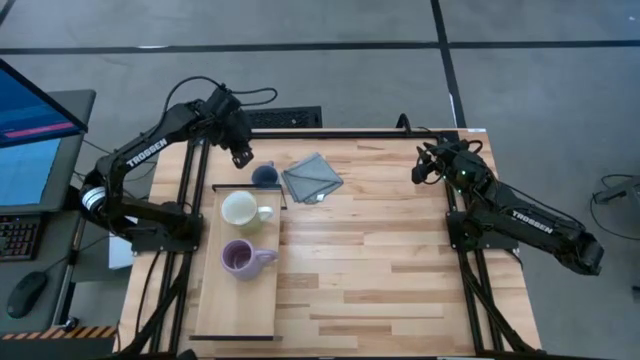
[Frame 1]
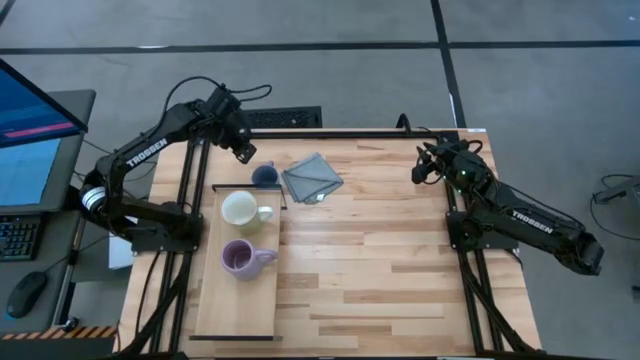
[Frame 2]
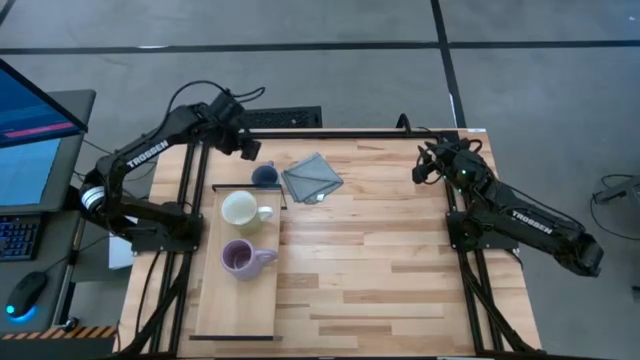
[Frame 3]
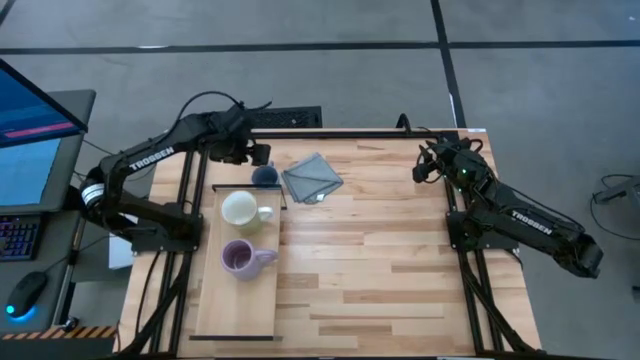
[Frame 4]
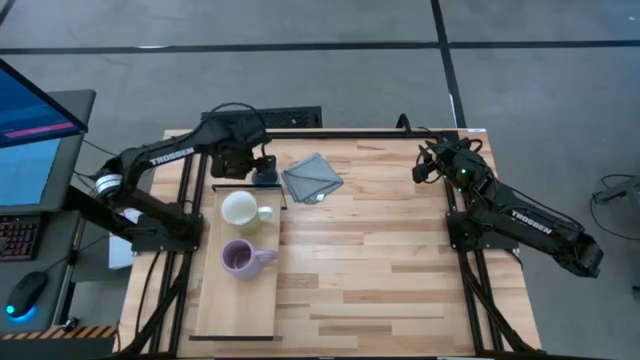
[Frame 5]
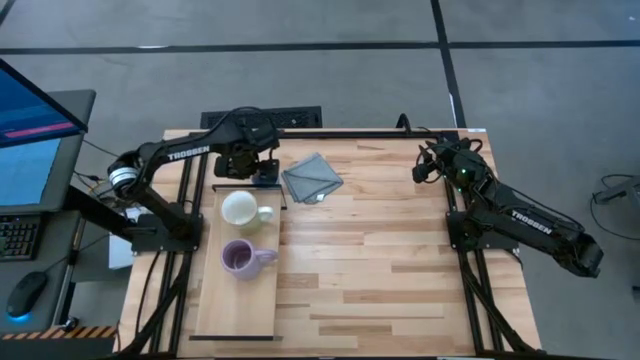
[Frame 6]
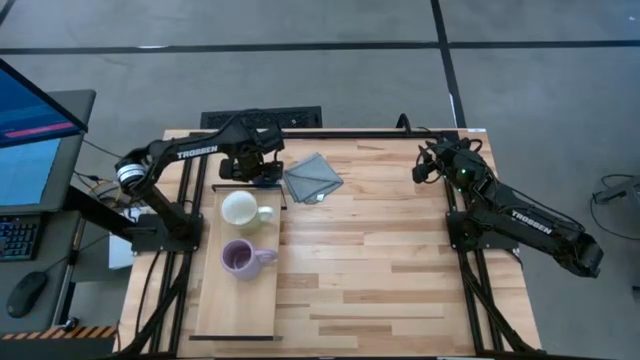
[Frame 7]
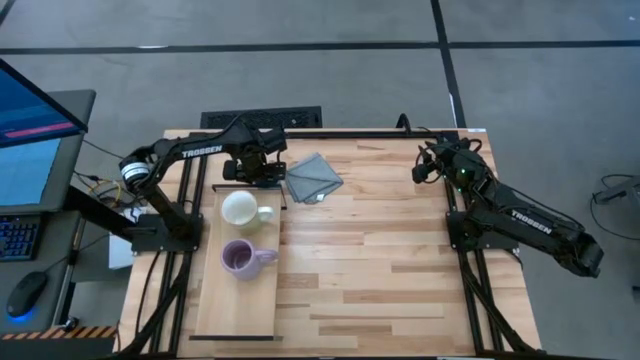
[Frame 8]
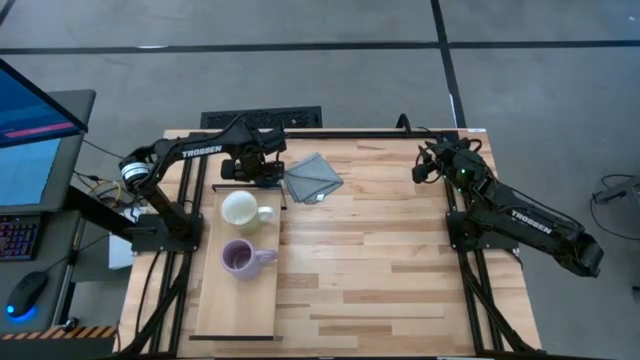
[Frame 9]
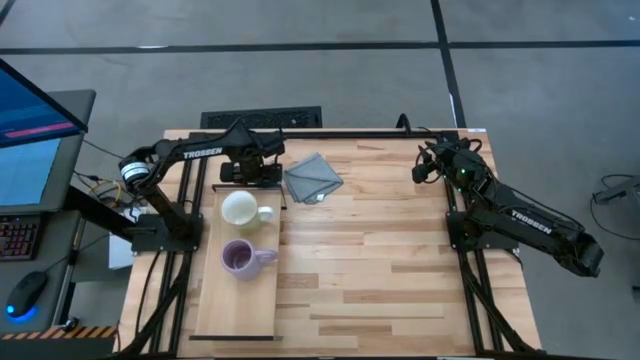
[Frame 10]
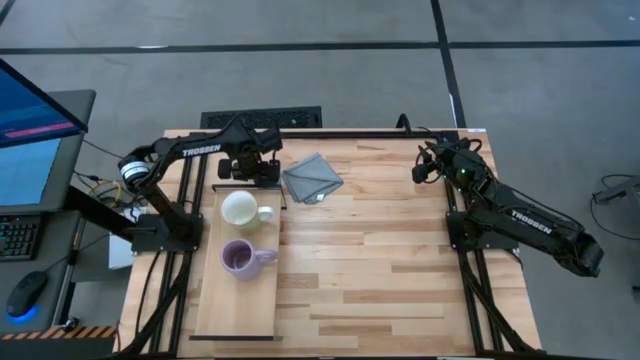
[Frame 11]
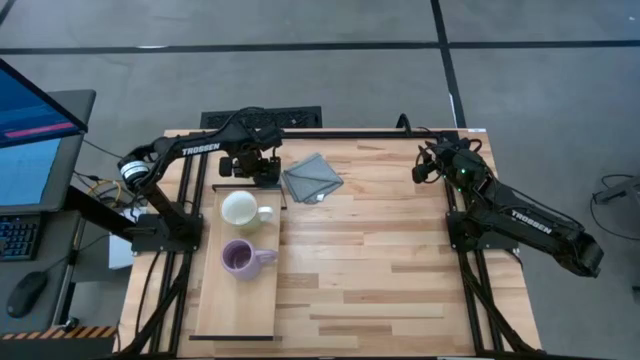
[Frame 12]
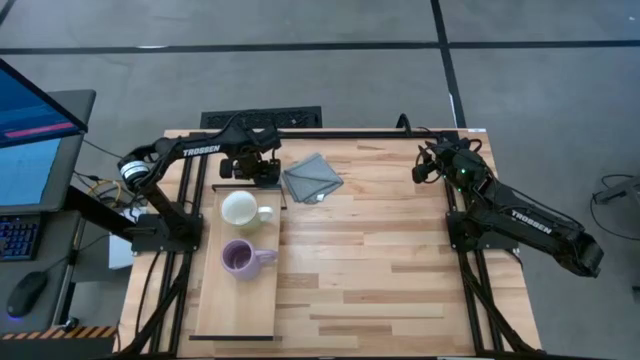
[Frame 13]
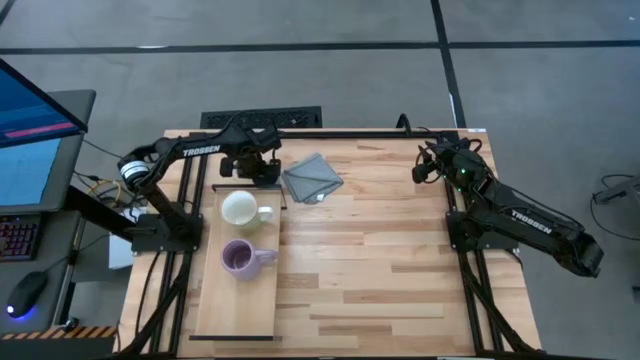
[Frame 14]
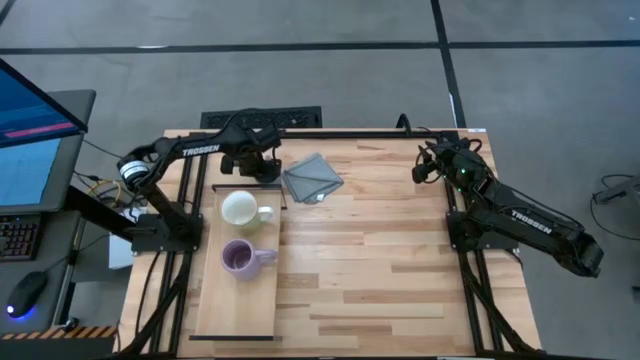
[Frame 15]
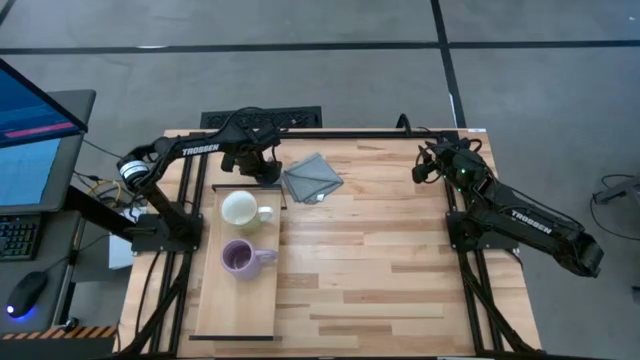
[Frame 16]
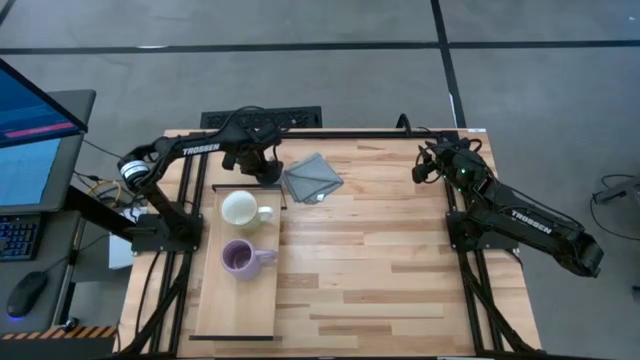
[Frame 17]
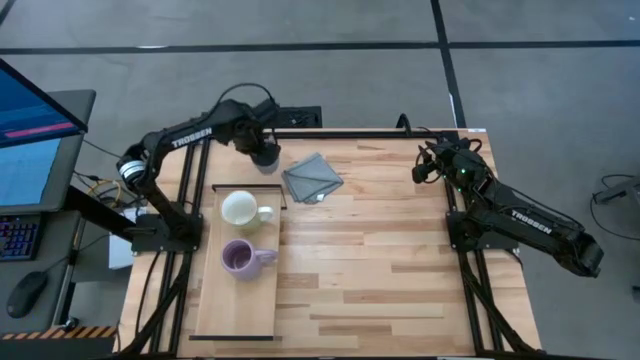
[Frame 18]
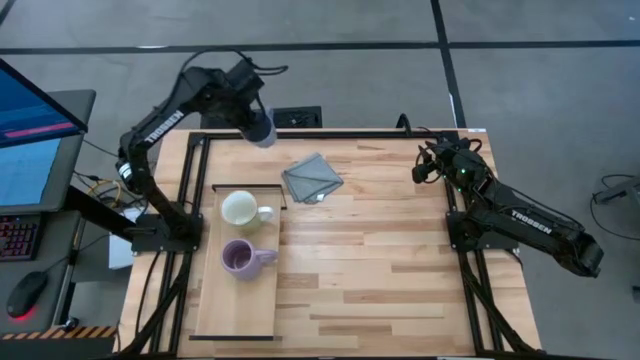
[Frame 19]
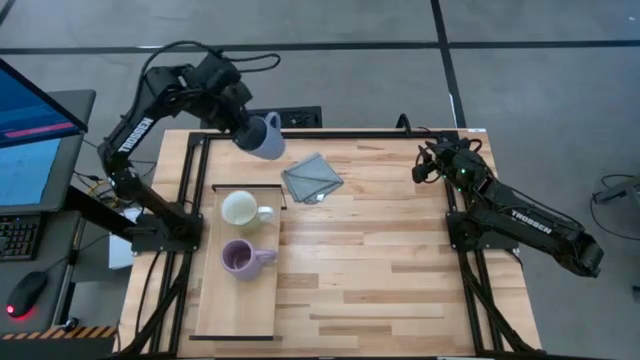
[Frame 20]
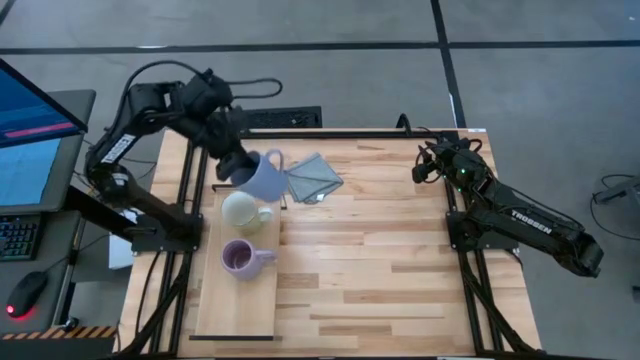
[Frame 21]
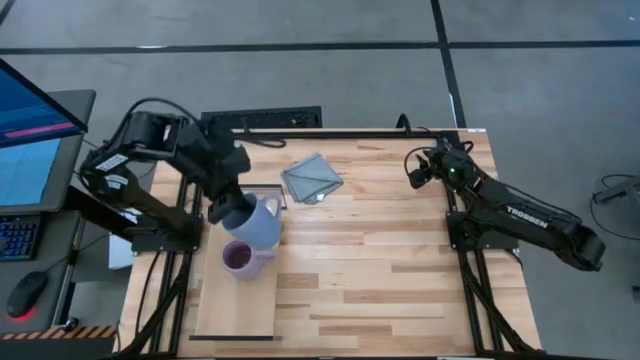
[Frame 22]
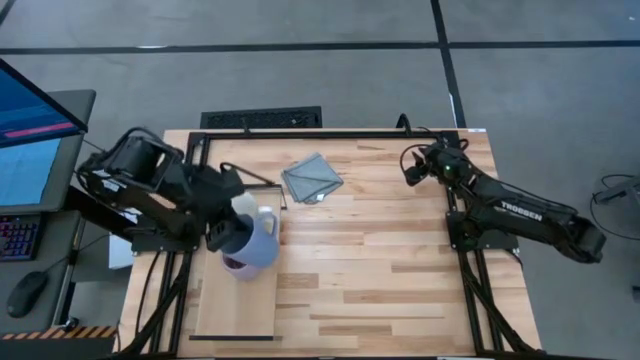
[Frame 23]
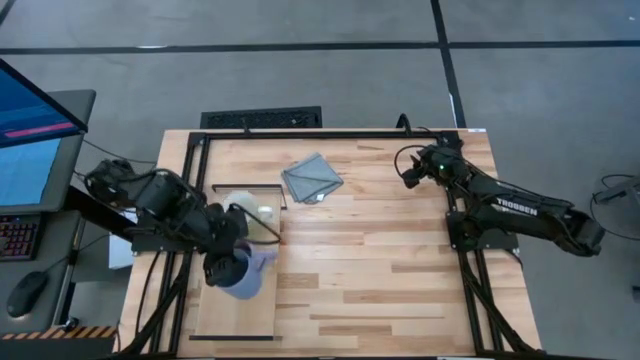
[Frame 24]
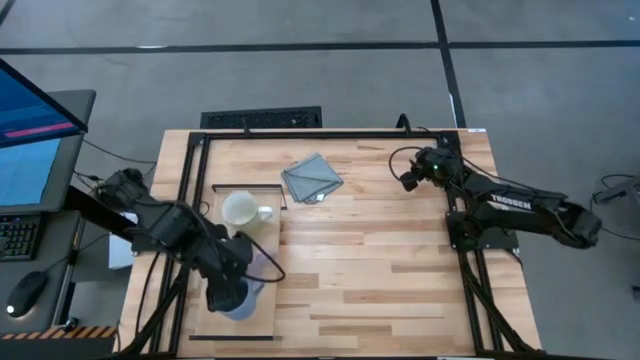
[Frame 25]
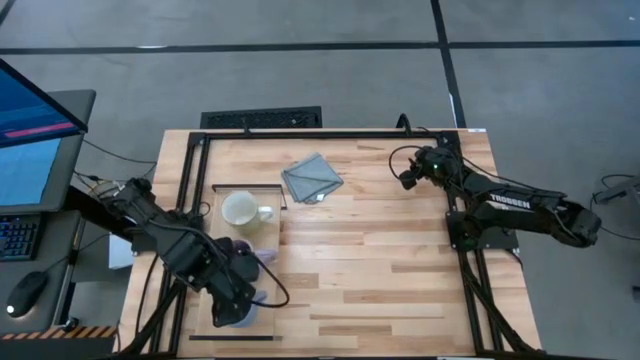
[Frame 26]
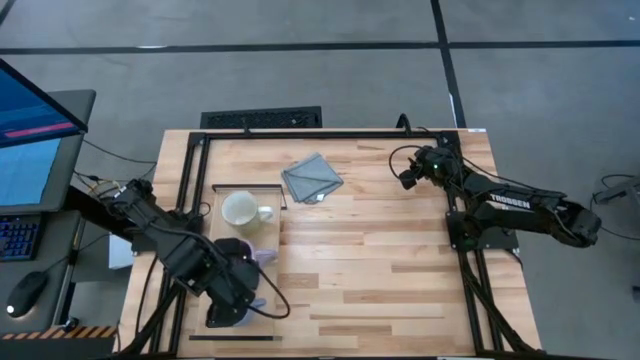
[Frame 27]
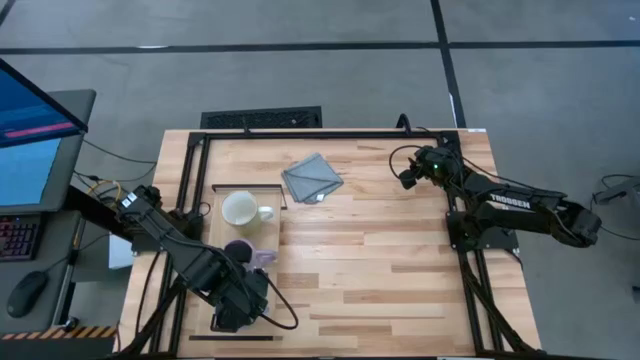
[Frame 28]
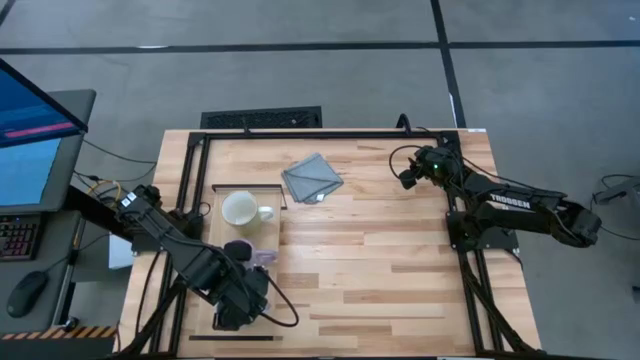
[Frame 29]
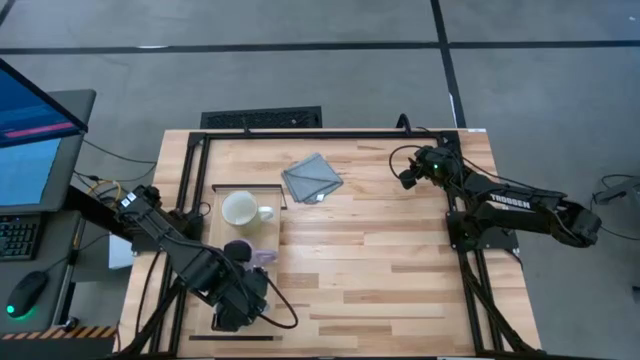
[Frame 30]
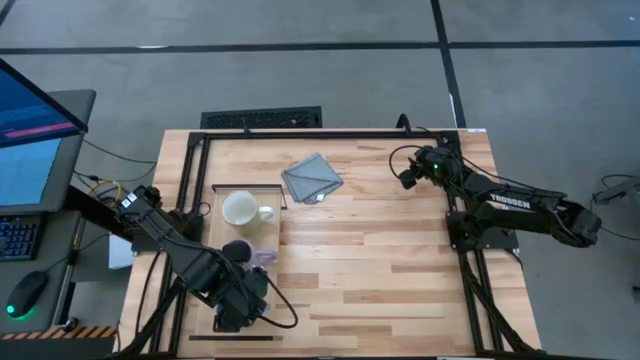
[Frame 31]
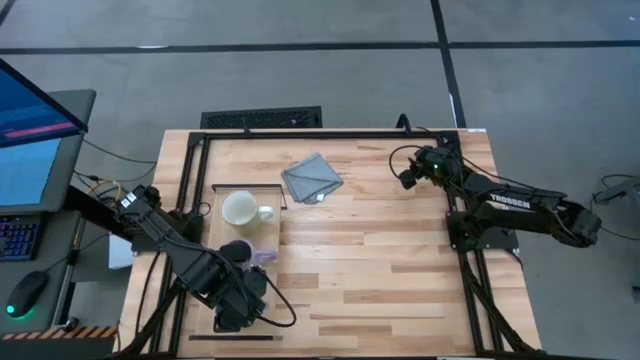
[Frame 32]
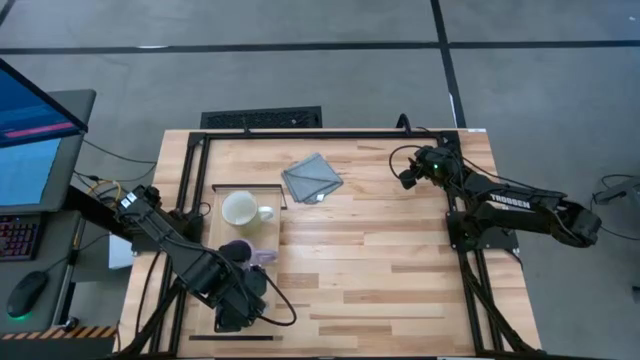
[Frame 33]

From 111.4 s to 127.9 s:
Task: Stack small to large cups/mugs on shelf
Put the blue mug on the shelf

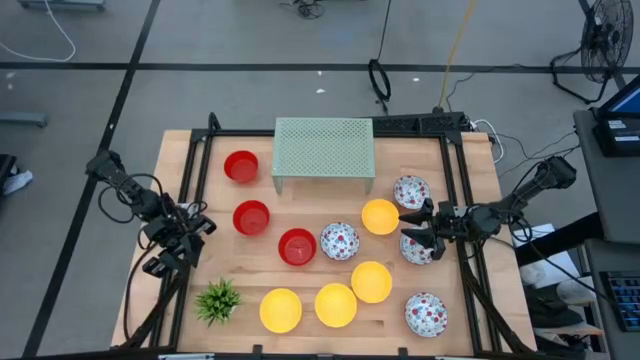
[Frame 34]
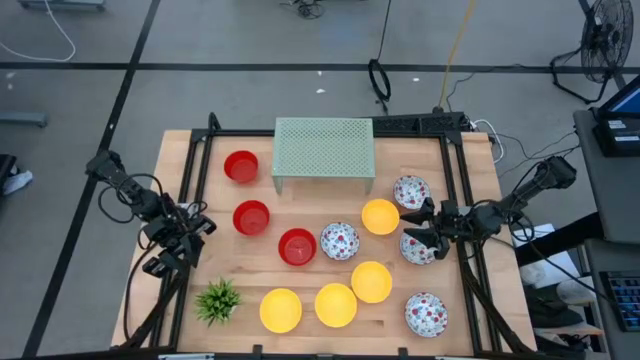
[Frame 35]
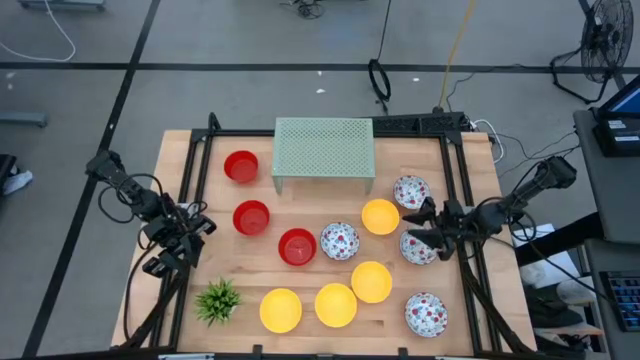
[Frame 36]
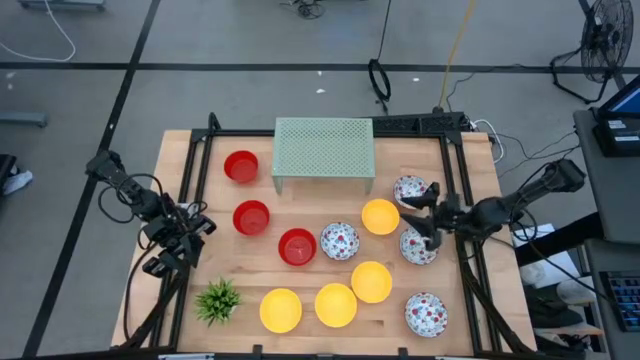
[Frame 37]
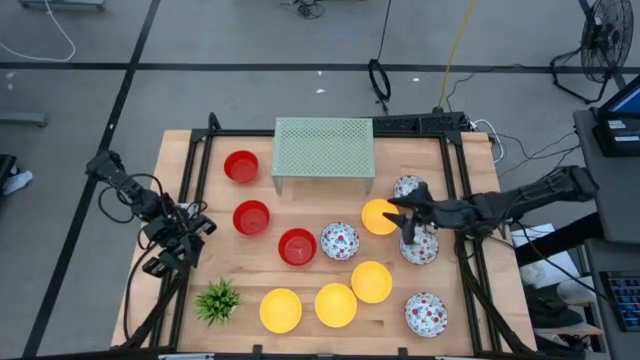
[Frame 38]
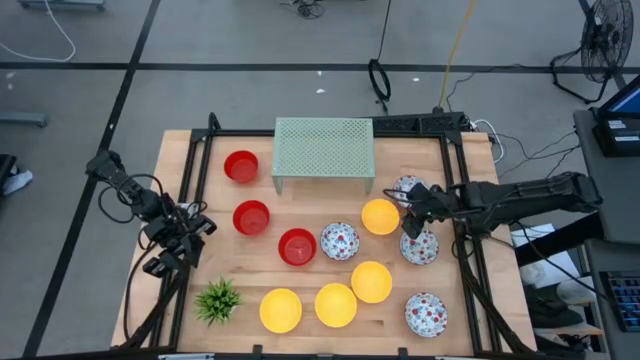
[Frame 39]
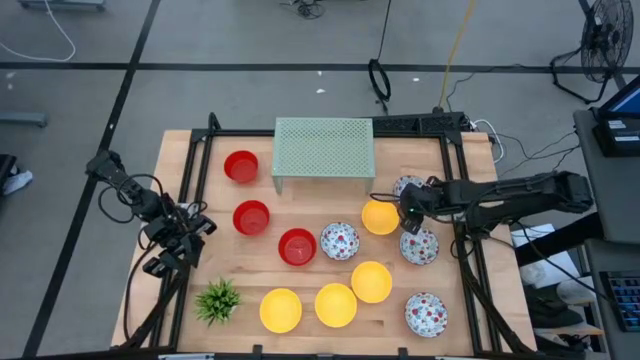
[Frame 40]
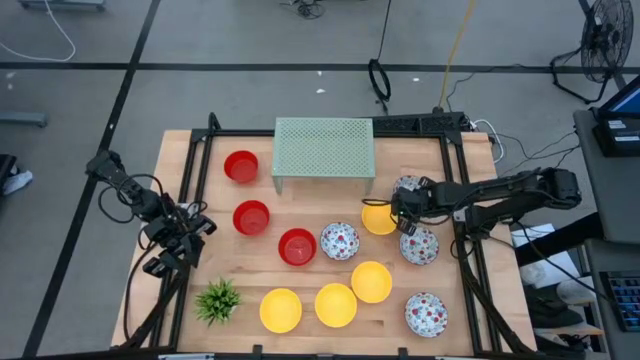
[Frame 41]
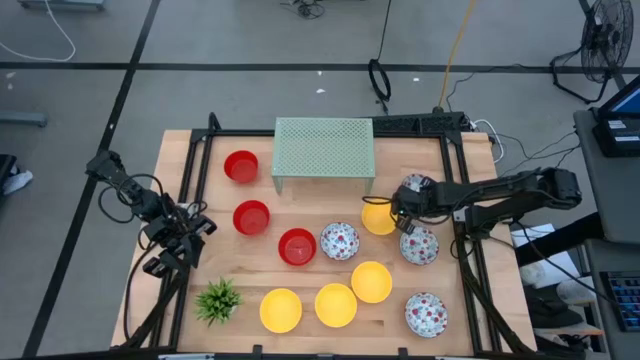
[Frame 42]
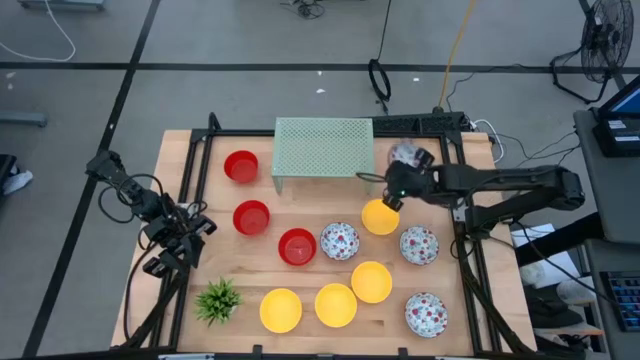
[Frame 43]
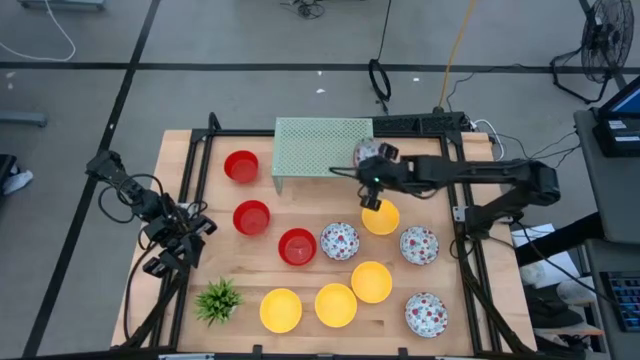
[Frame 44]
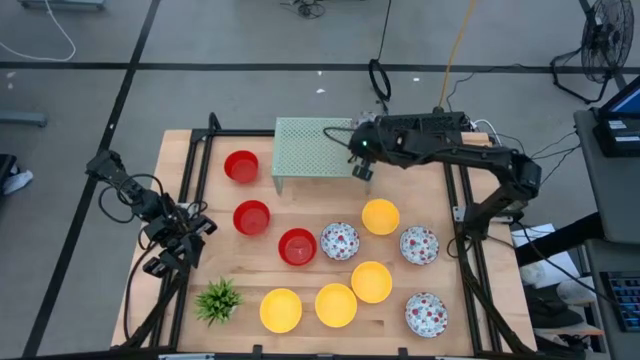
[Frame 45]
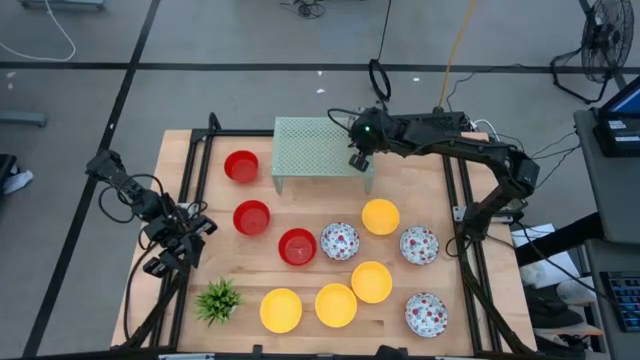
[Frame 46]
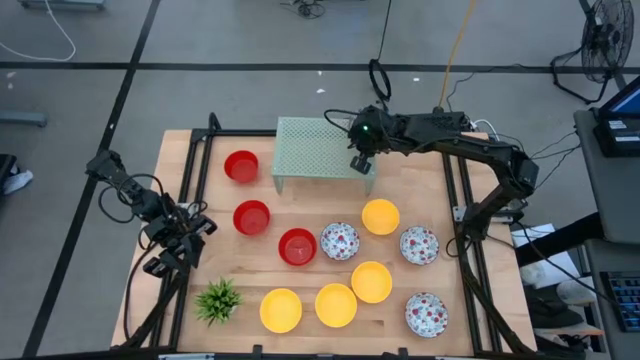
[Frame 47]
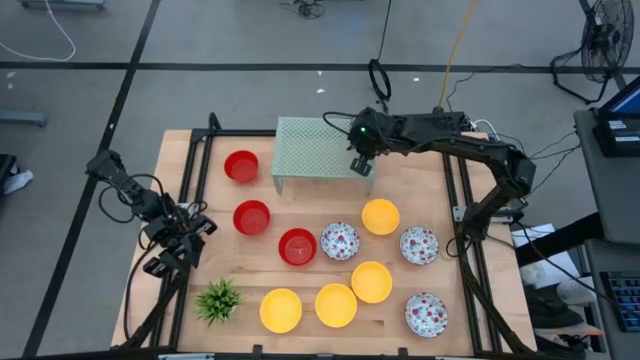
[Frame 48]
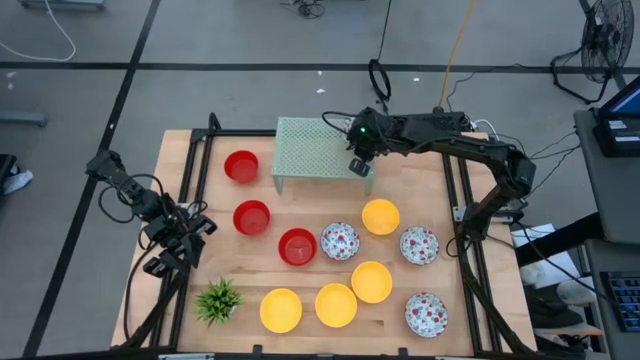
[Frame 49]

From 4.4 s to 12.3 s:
Task: Pick & Place Mini bowls
Put the red patterned bowl on the shelf
